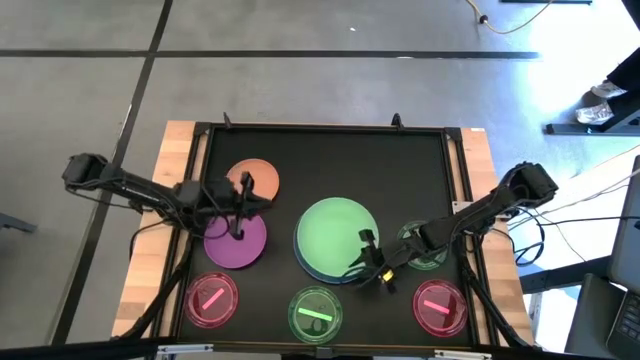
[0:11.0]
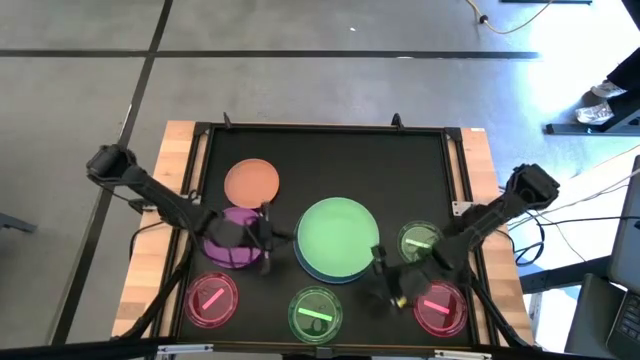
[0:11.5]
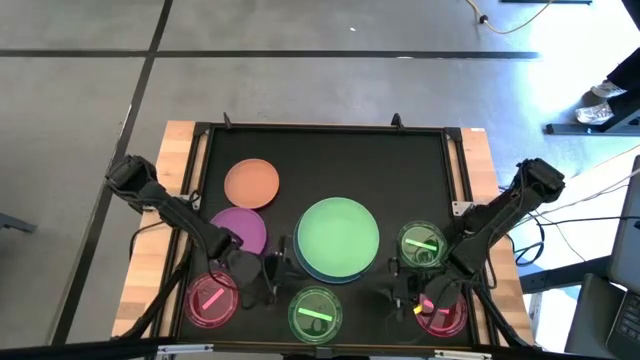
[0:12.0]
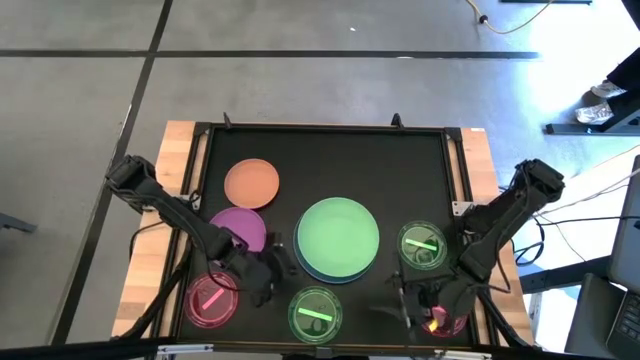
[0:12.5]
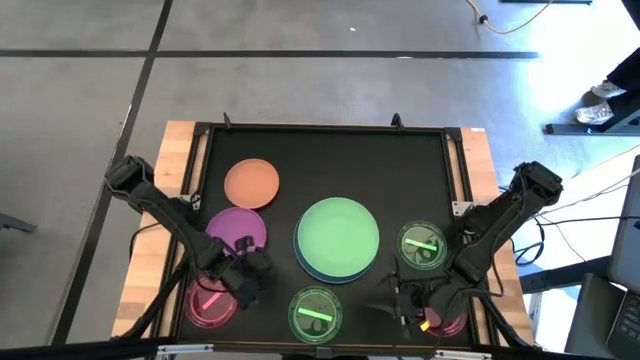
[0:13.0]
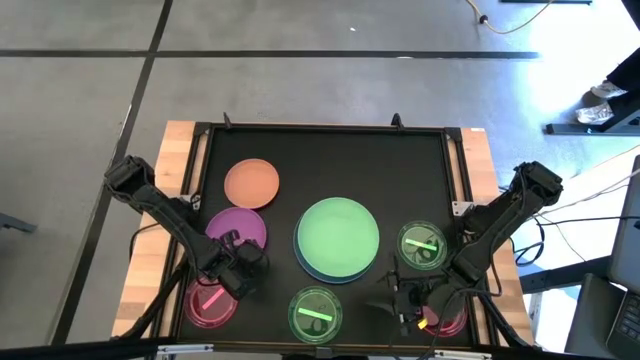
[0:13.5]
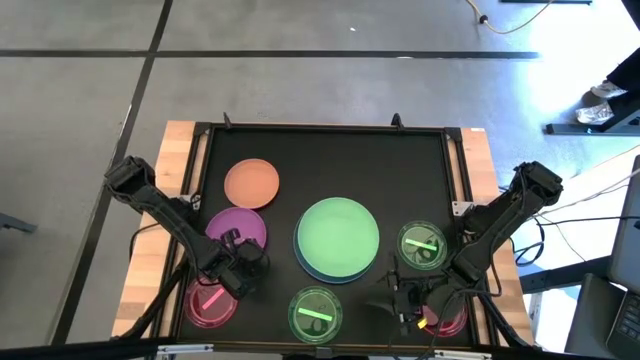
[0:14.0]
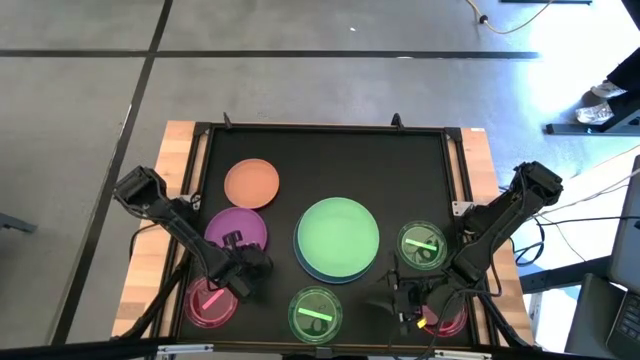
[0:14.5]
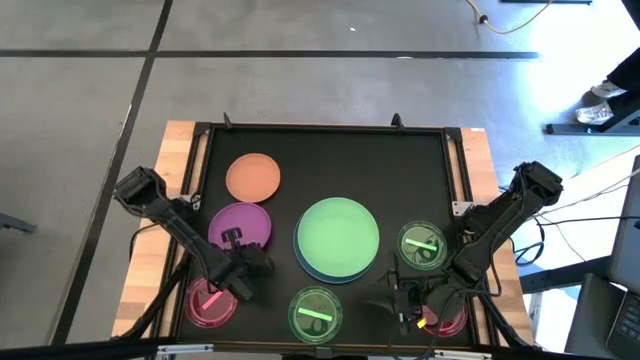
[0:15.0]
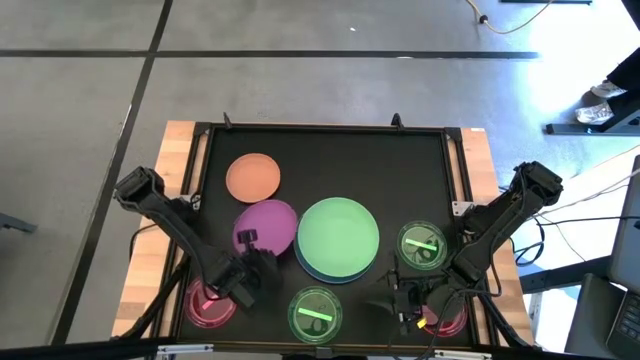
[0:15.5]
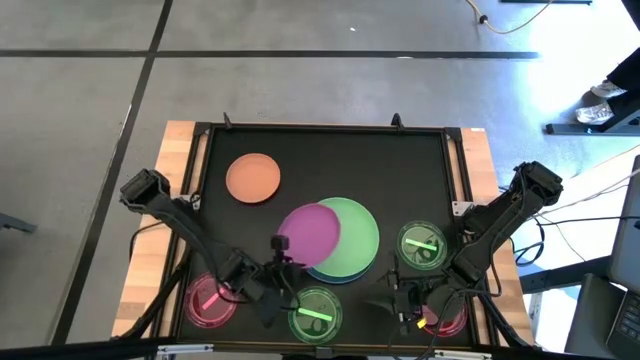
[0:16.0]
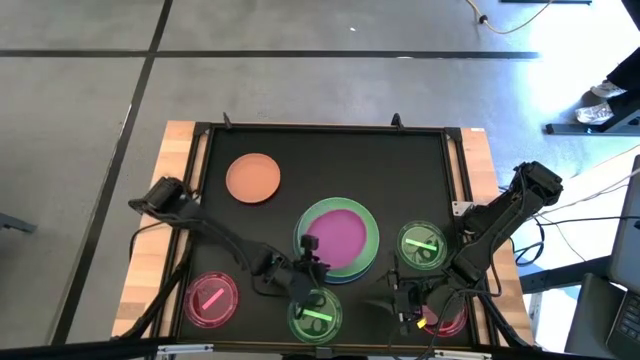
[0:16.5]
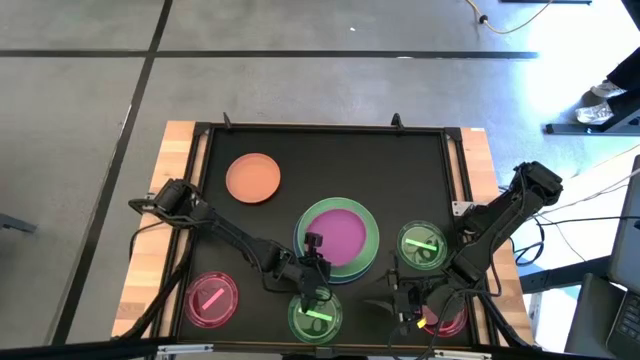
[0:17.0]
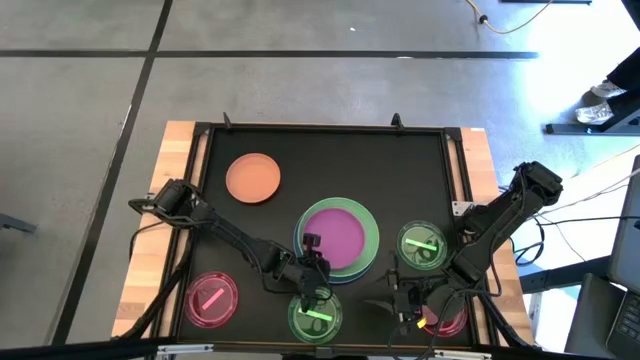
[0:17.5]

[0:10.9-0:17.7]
Task: Stack plastic plates
Stack the violet plate on top of the light green plate

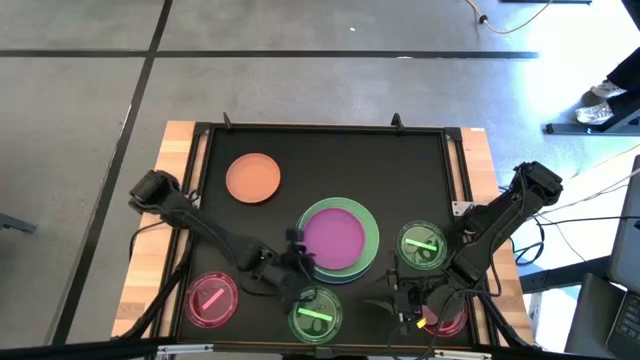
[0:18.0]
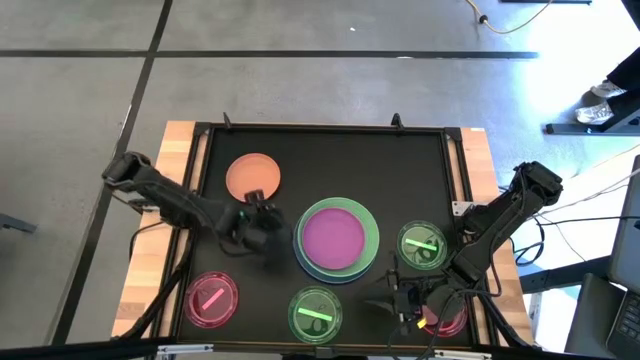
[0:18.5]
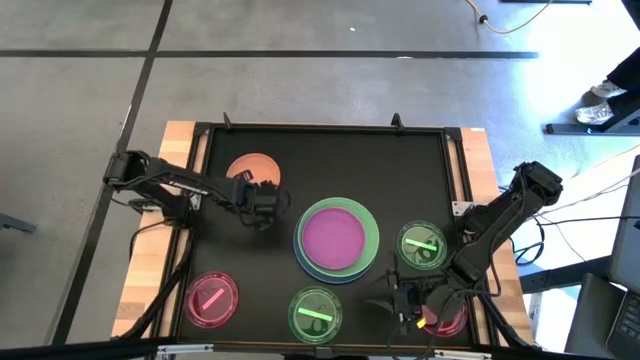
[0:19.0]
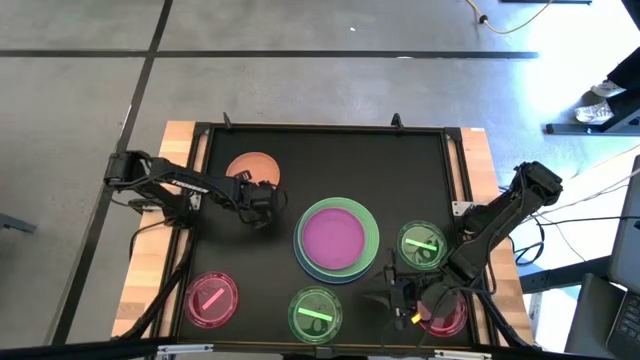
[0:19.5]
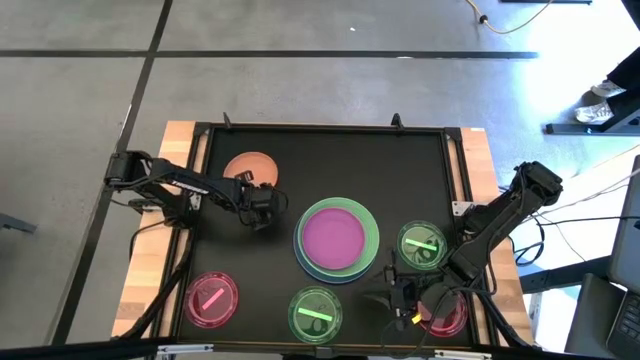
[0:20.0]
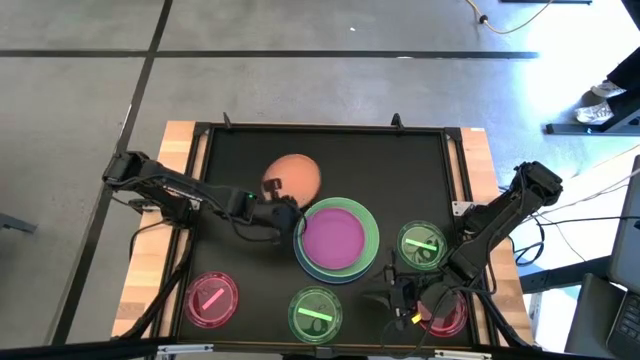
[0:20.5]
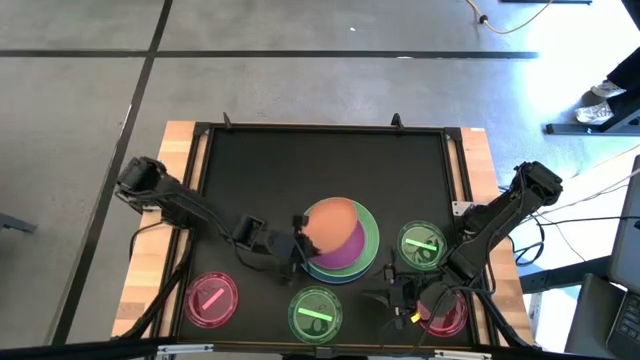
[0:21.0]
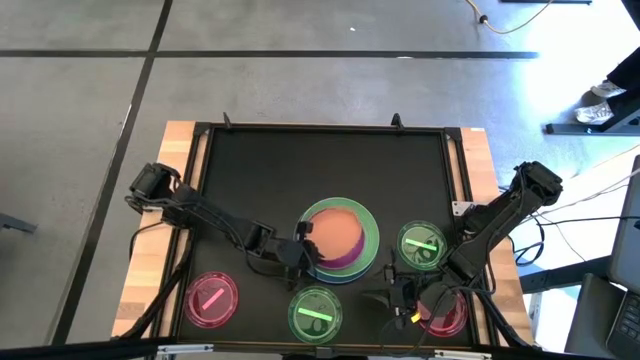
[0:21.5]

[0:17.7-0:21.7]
Stack the orange plate on top of the violet plate

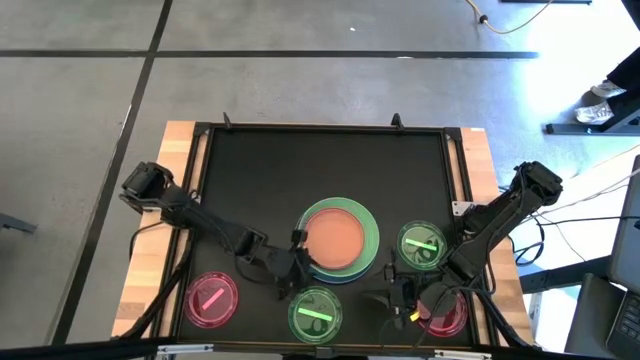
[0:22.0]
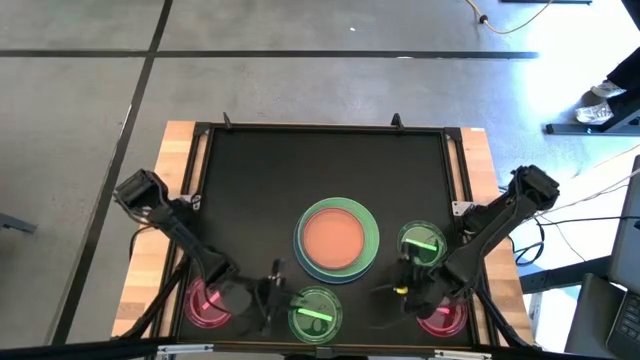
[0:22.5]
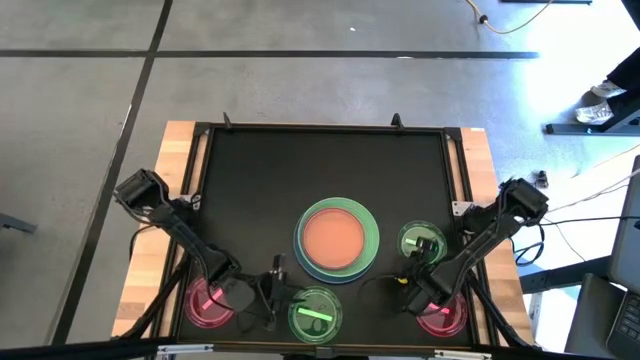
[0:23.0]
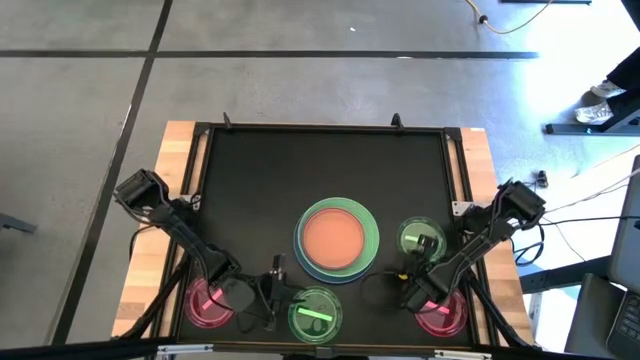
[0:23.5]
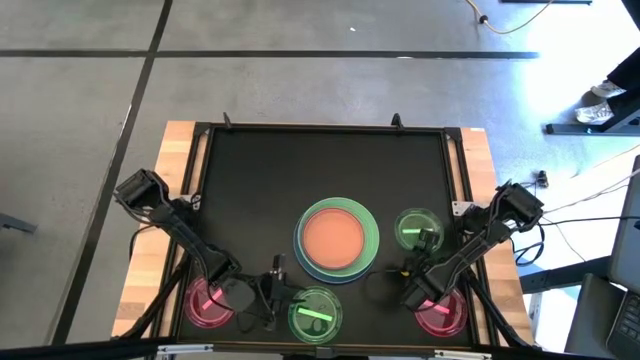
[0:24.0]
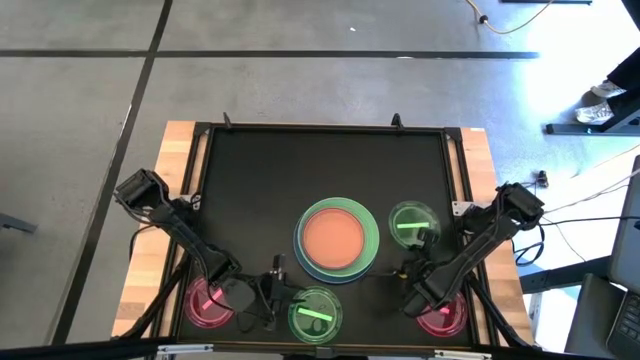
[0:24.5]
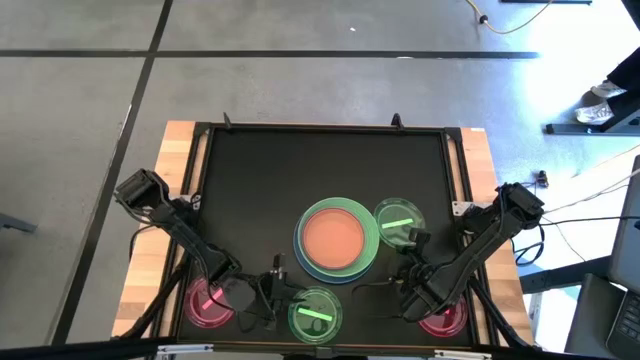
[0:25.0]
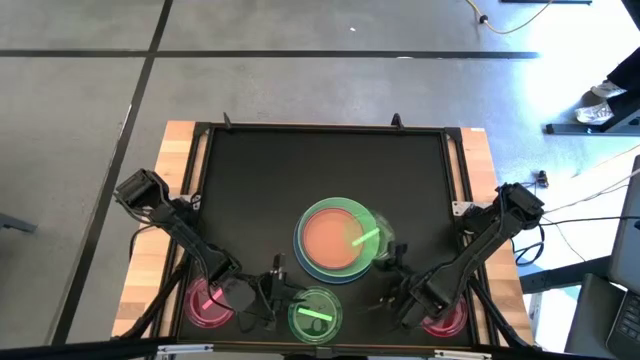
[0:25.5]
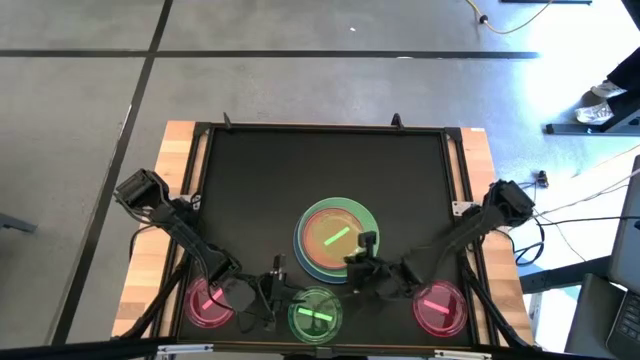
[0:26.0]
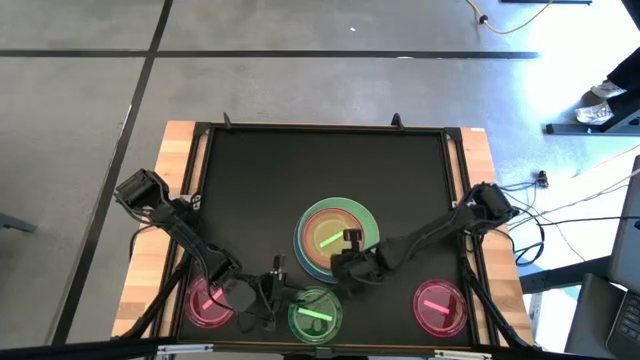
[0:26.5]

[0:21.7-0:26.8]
Stack the top green plate on top of the orange plate

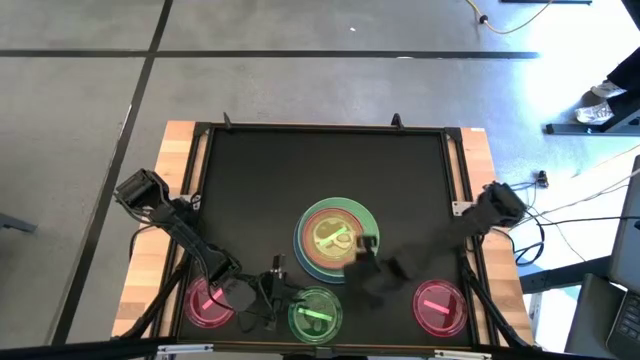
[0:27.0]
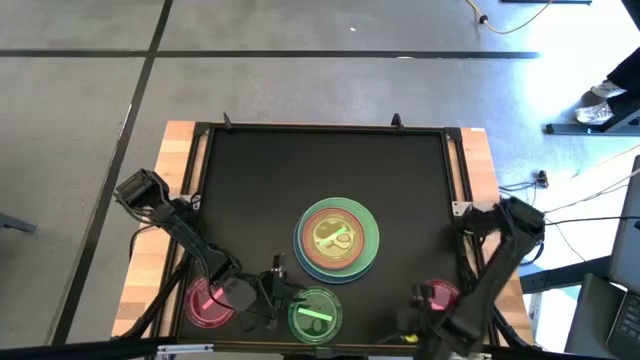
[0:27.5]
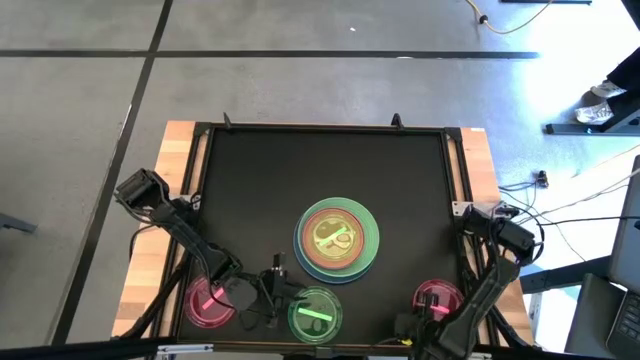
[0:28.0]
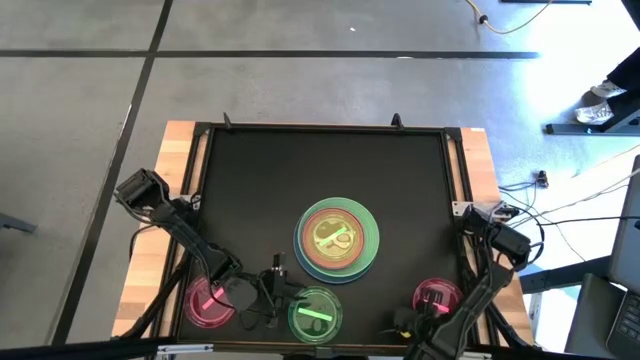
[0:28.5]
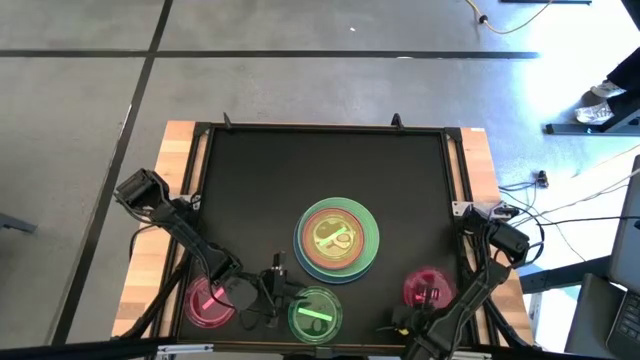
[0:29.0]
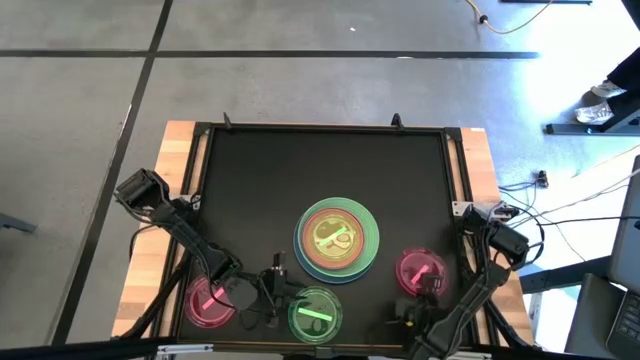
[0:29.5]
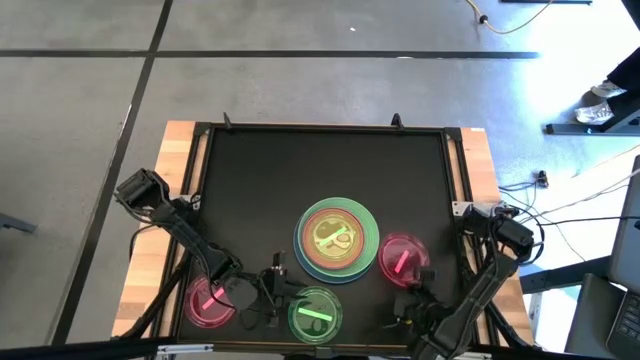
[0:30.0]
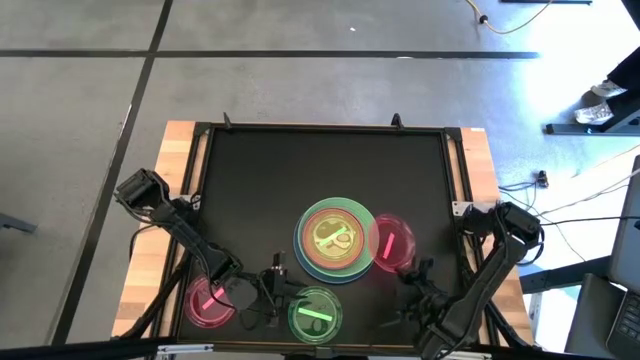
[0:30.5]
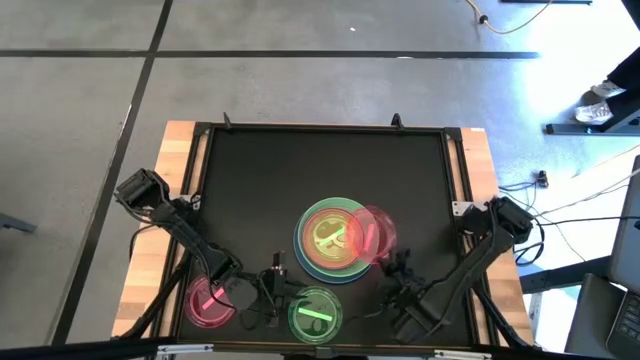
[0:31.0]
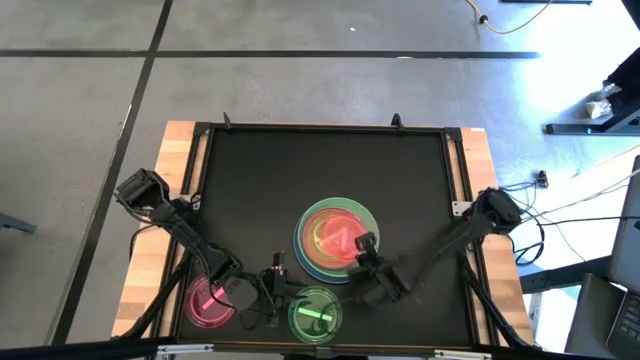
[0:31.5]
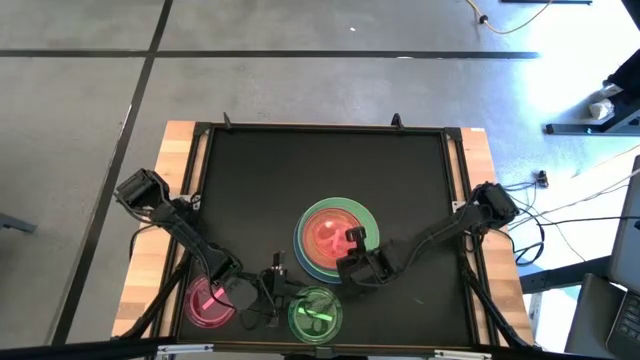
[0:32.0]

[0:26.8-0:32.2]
Stack the right red plate on top of the top green plate
